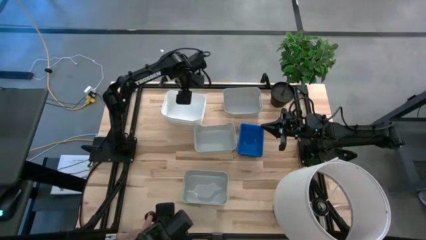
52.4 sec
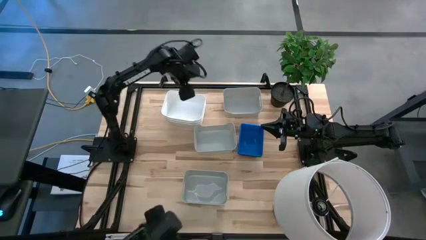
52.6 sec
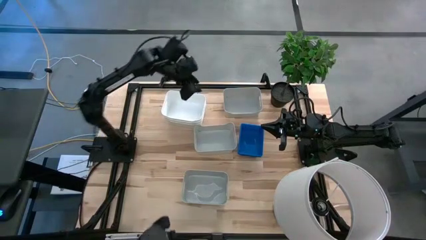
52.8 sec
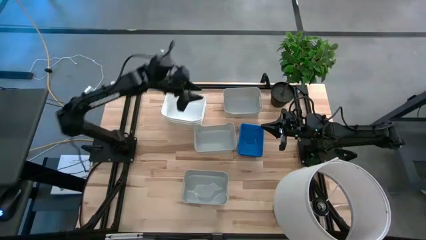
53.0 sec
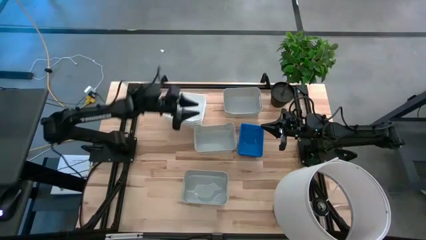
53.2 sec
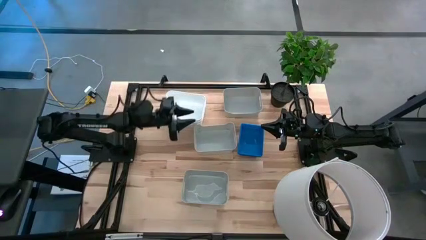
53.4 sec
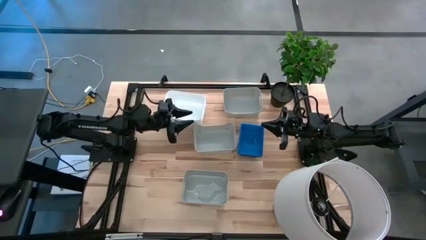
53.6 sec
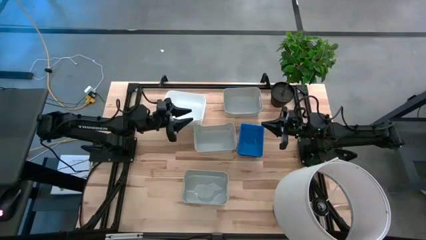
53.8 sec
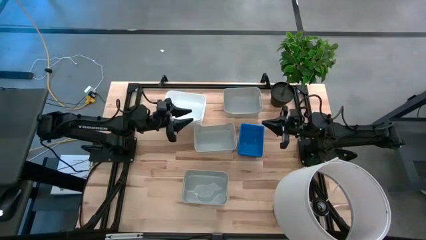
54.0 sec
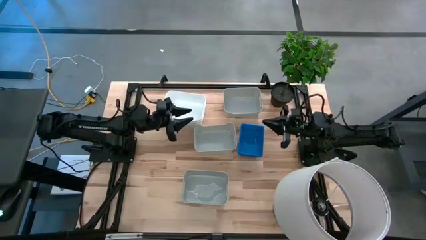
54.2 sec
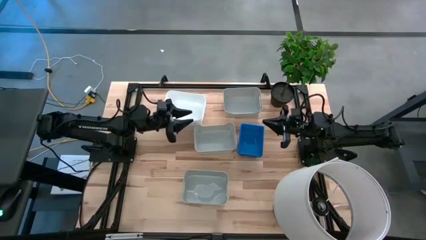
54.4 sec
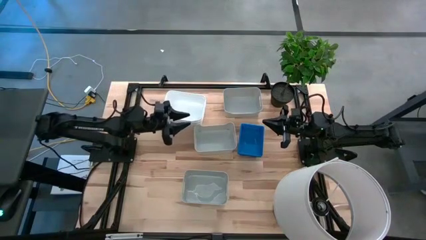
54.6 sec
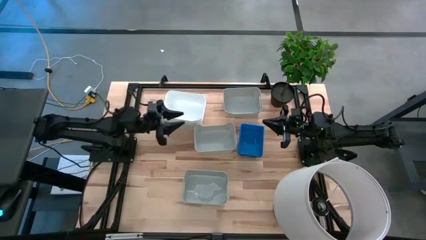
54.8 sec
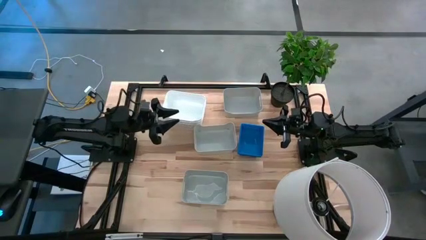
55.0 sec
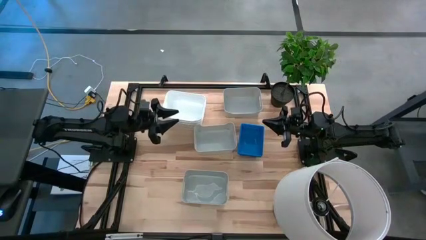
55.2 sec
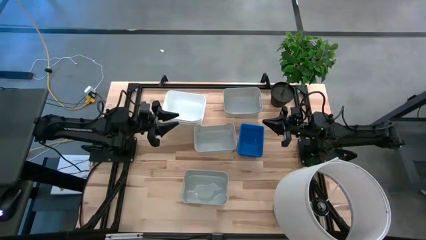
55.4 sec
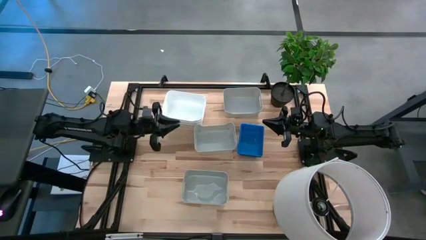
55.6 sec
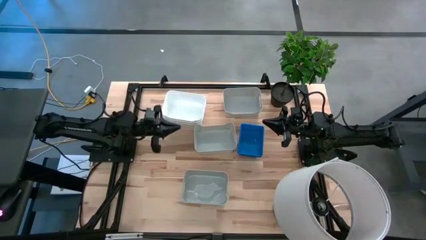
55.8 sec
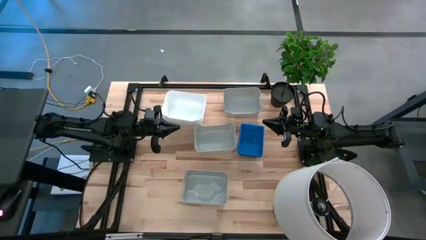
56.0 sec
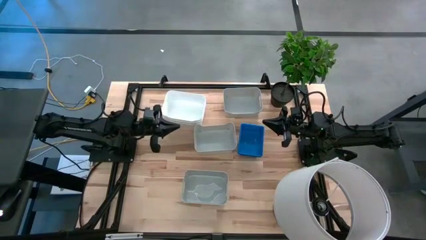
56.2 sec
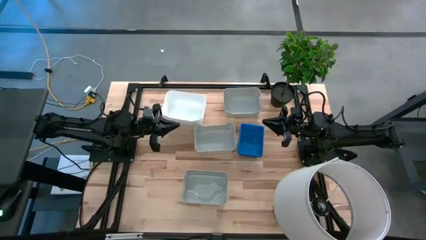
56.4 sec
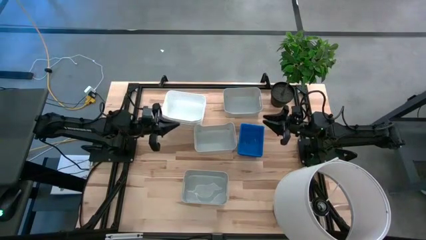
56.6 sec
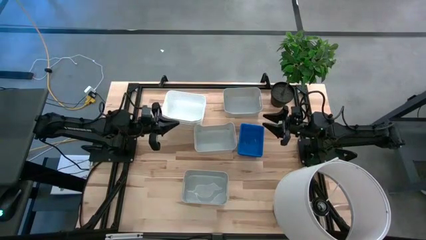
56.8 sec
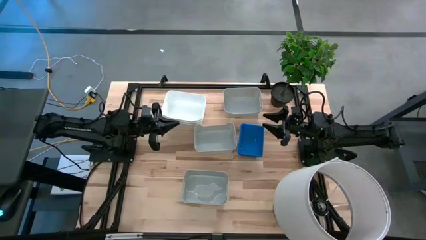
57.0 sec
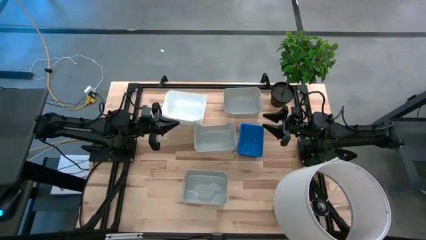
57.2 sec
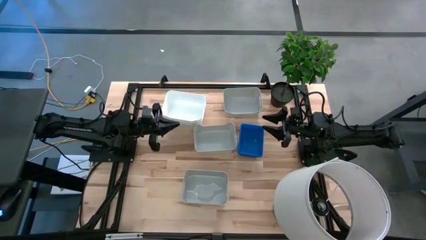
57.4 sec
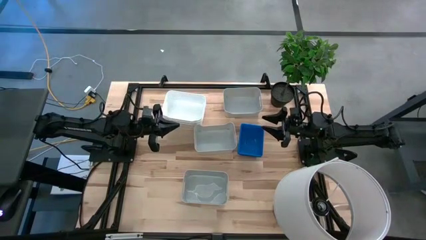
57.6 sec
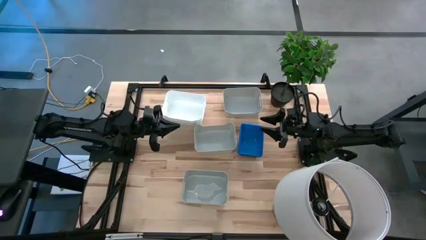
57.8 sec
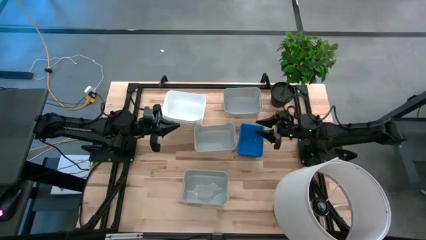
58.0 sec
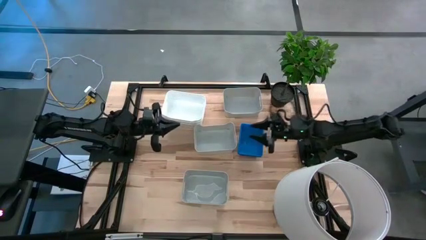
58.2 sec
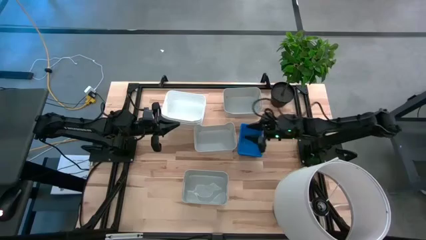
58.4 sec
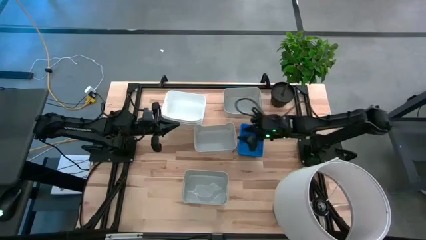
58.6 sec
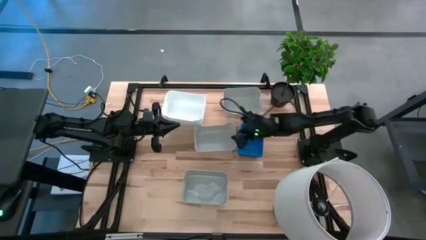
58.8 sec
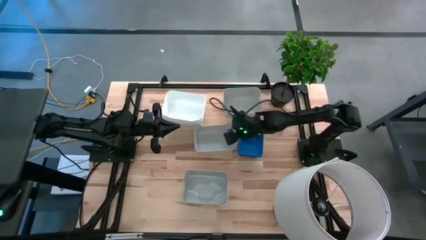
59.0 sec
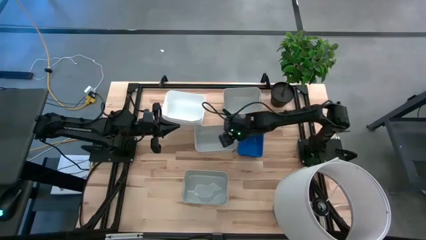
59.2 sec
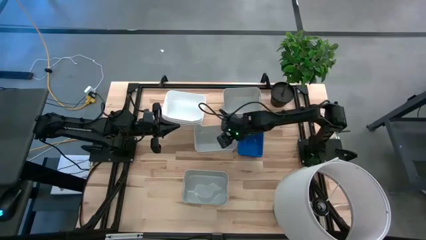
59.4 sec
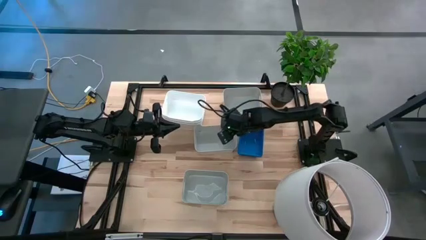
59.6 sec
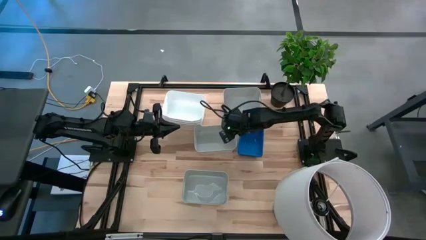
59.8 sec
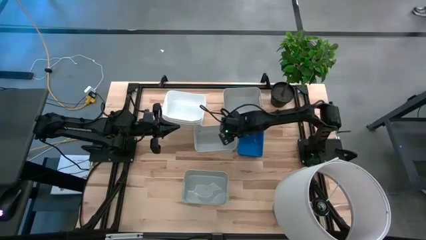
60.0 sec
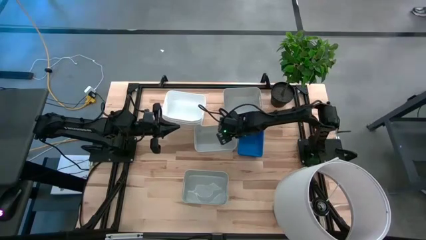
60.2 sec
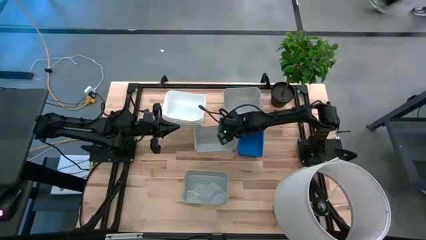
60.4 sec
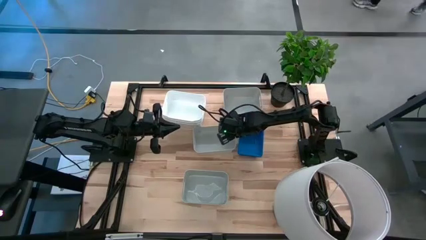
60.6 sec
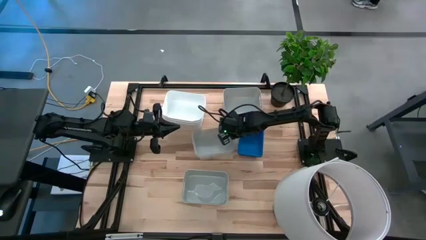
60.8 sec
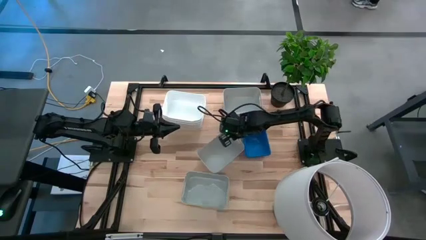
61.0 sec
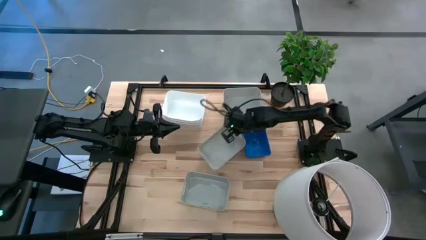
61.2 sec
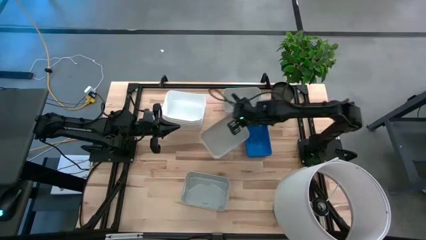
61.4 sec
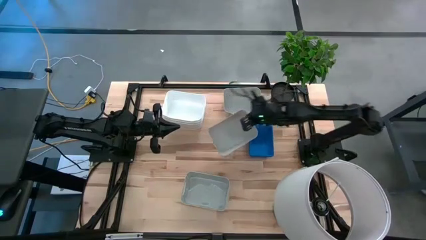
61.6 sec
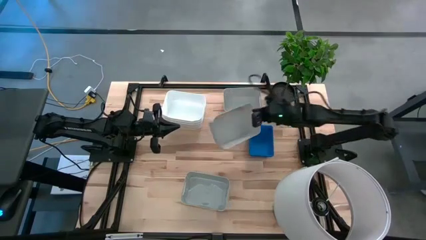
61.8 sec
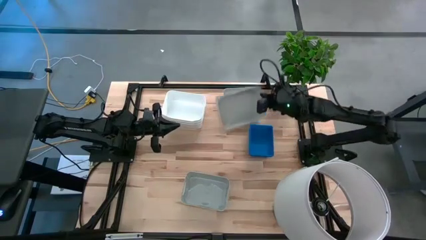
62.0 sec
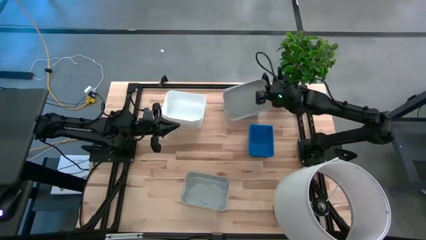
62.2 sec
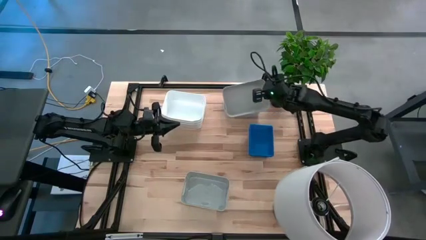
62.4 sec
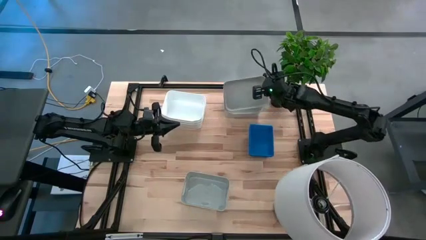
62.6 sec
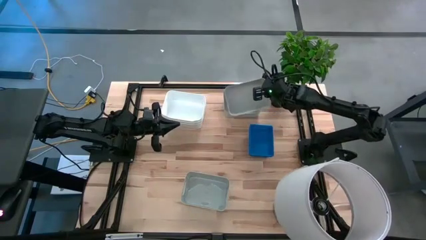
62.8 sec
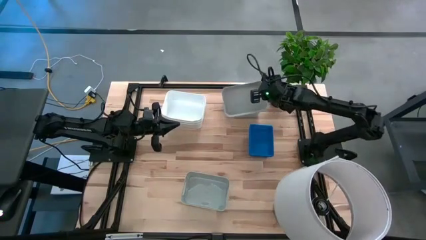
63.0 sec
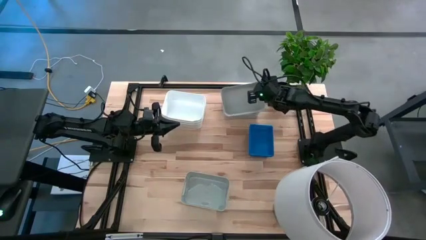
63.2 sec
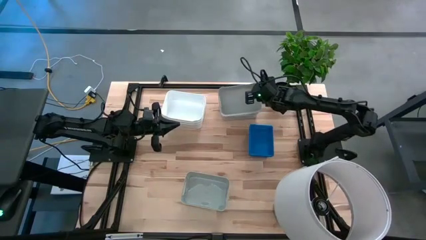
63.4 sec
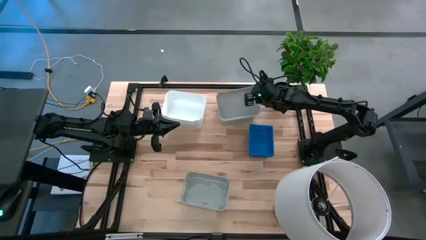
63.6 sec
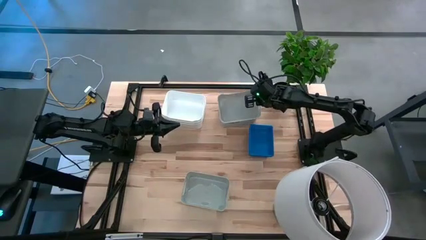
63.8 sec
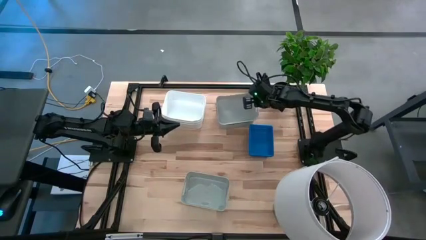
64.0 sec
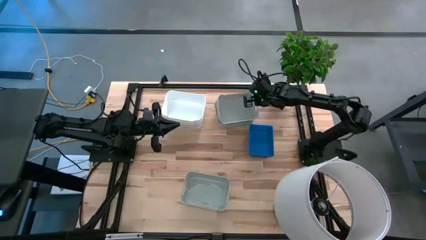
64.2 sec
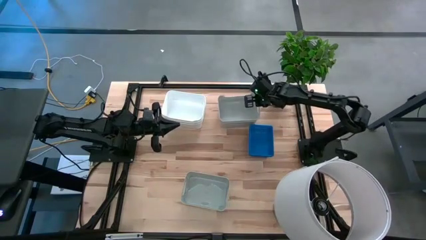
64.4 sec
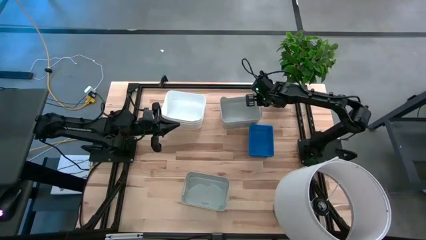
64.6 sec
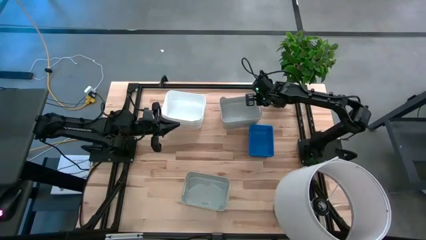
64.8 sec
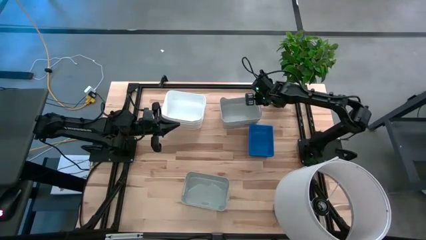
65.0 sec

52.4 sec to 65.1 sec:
Stack the center gray bin into the top right gray bin
